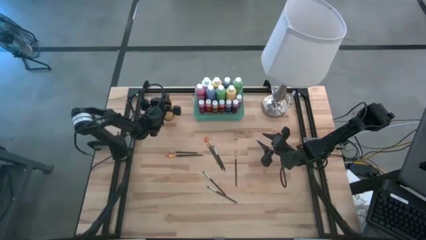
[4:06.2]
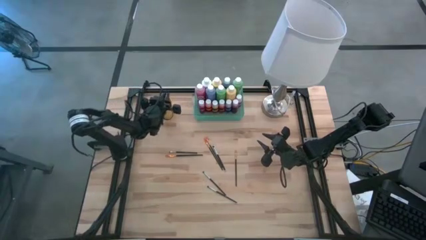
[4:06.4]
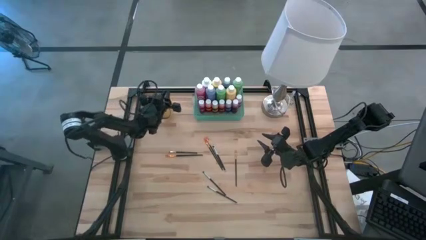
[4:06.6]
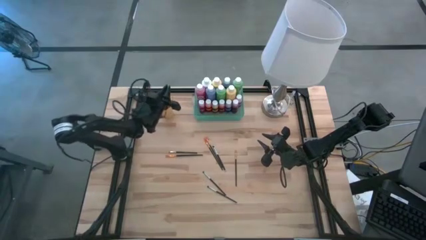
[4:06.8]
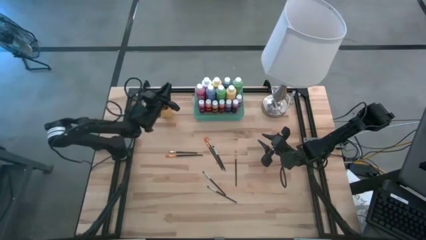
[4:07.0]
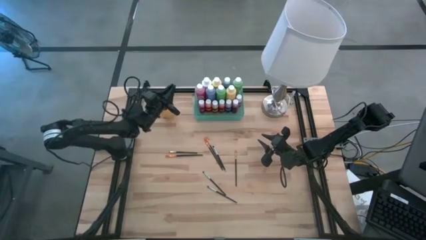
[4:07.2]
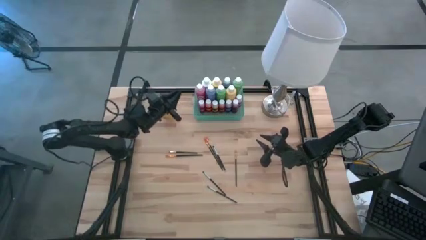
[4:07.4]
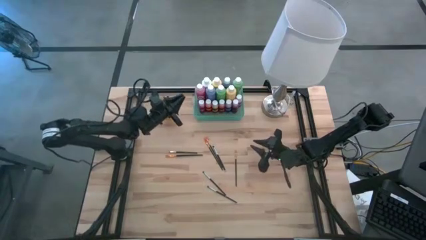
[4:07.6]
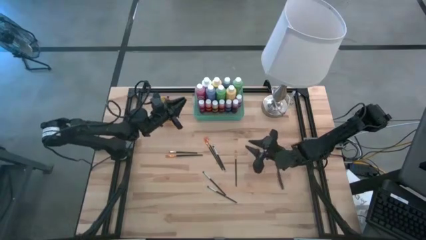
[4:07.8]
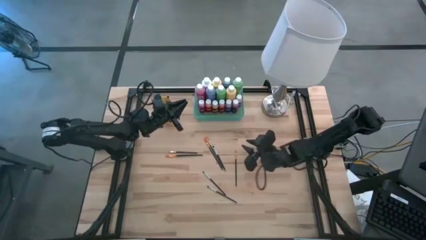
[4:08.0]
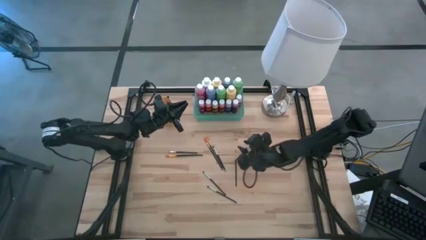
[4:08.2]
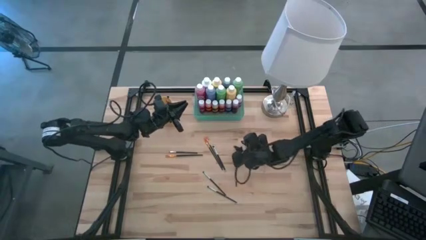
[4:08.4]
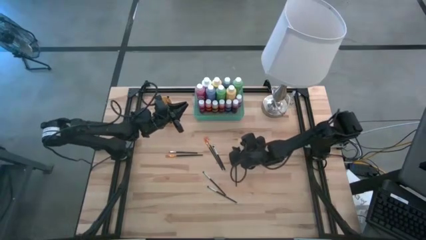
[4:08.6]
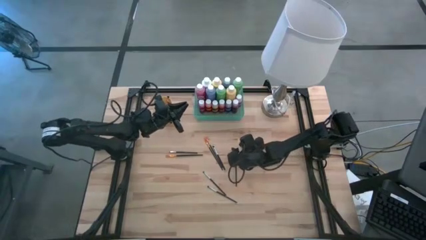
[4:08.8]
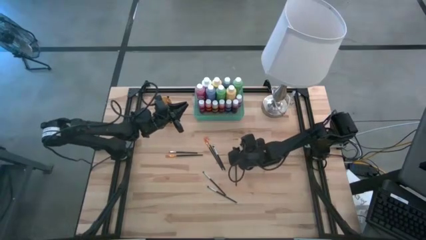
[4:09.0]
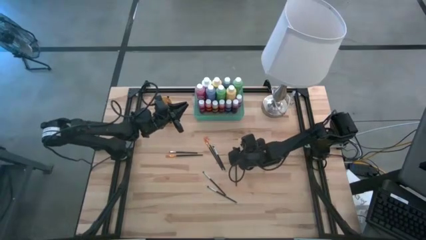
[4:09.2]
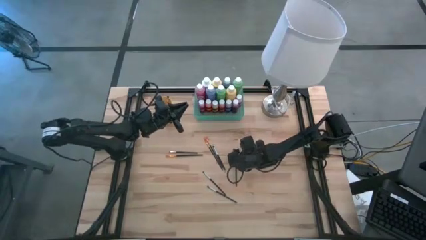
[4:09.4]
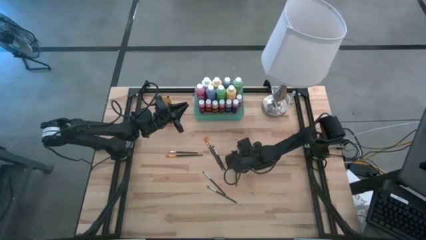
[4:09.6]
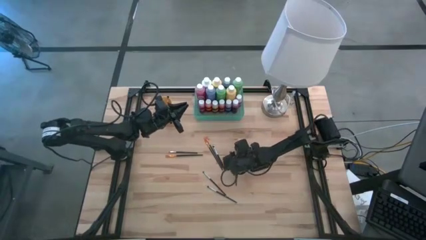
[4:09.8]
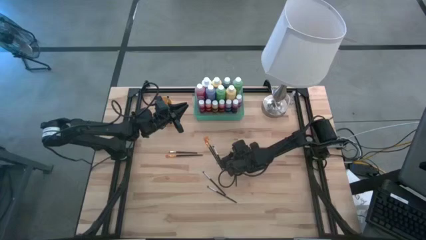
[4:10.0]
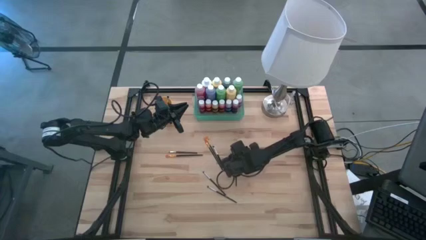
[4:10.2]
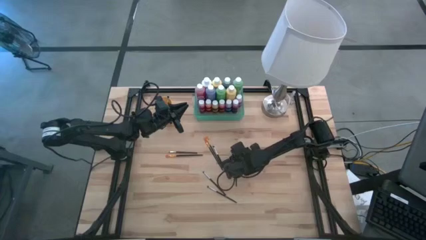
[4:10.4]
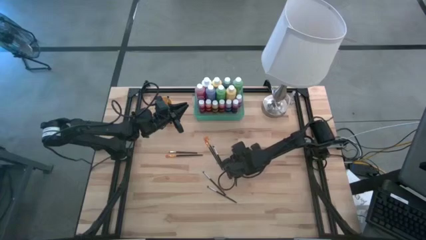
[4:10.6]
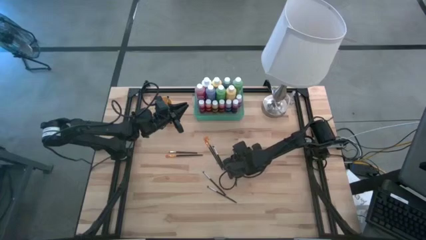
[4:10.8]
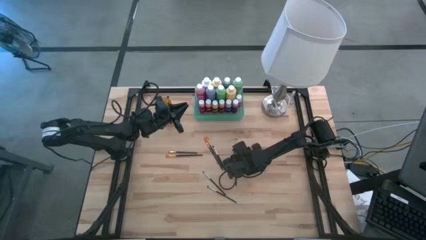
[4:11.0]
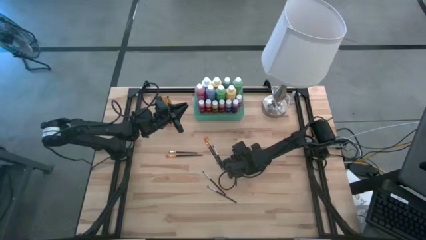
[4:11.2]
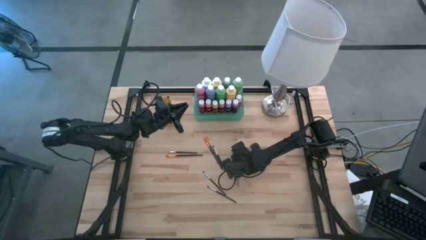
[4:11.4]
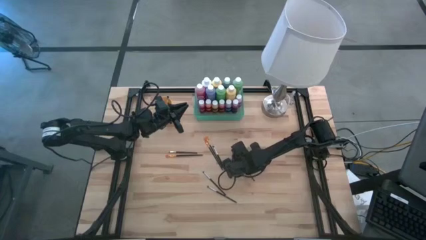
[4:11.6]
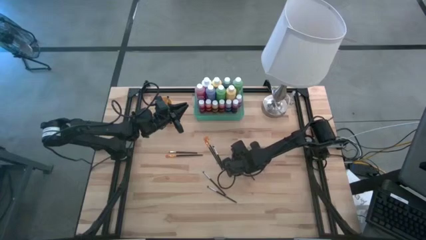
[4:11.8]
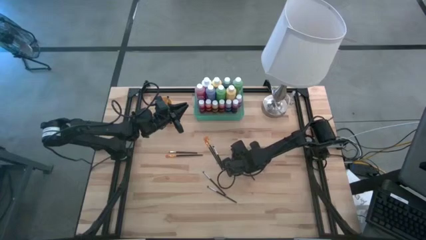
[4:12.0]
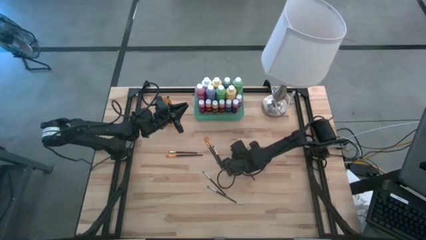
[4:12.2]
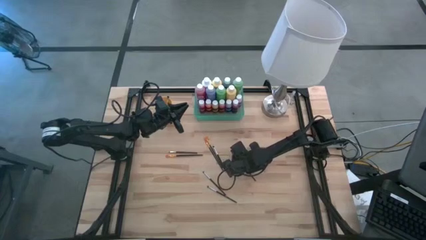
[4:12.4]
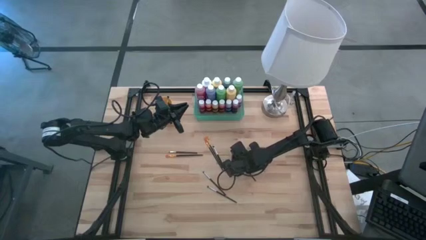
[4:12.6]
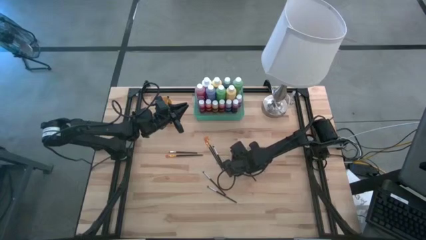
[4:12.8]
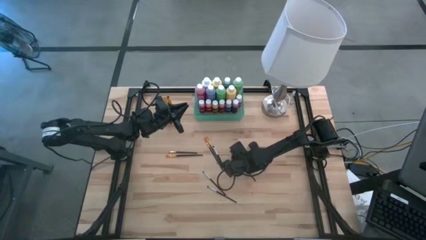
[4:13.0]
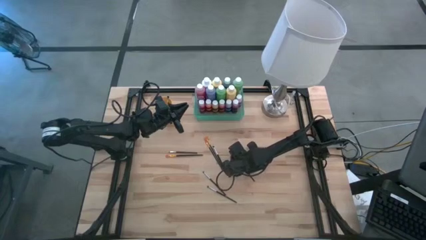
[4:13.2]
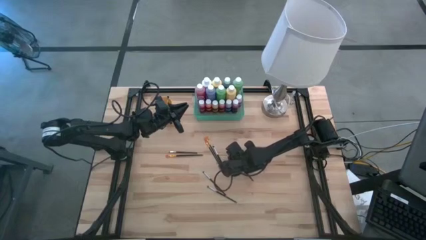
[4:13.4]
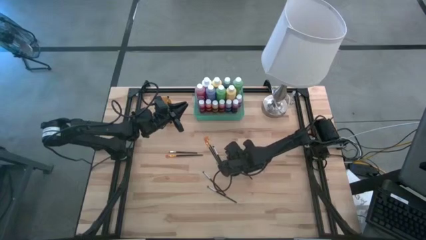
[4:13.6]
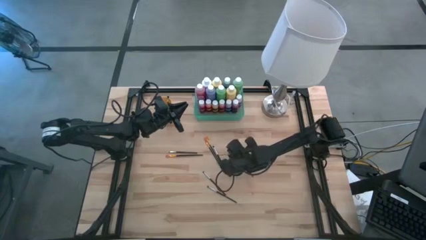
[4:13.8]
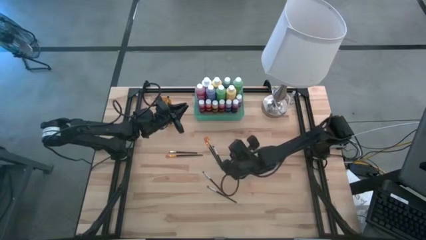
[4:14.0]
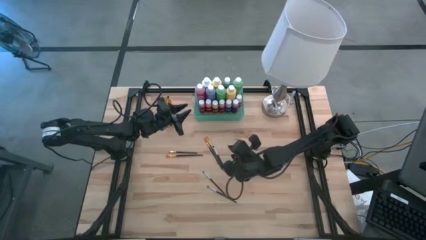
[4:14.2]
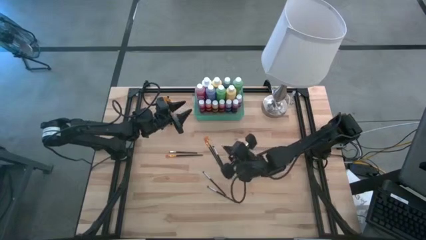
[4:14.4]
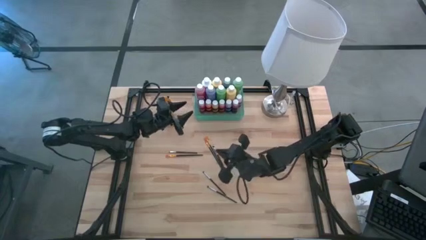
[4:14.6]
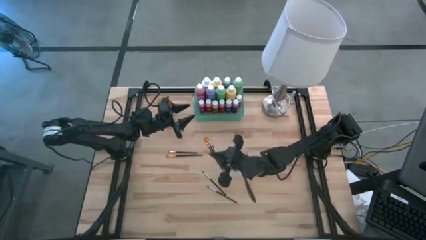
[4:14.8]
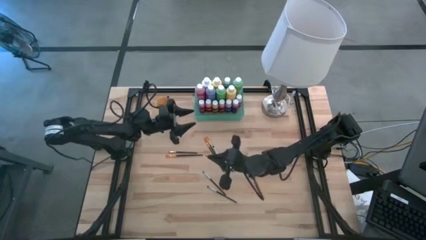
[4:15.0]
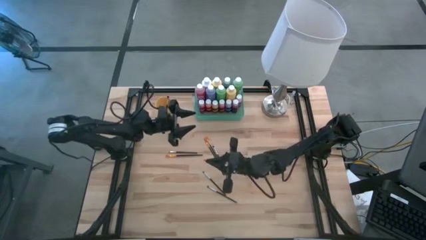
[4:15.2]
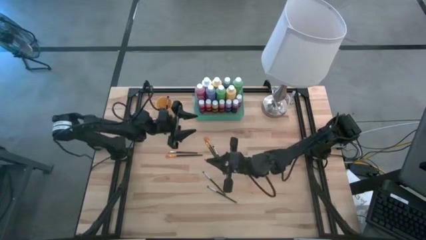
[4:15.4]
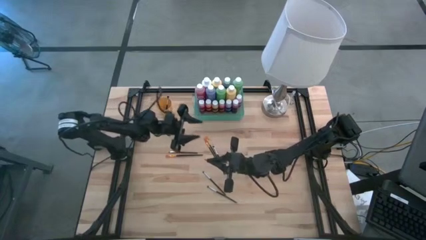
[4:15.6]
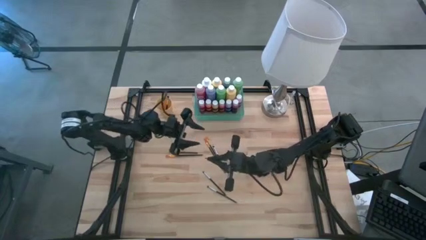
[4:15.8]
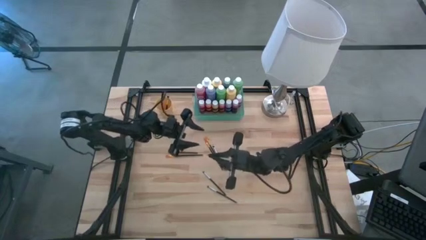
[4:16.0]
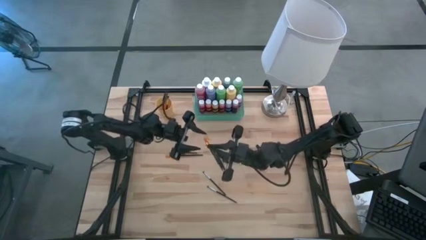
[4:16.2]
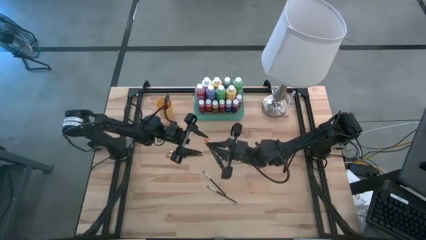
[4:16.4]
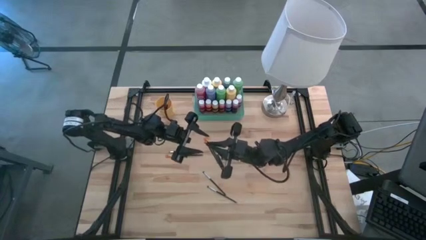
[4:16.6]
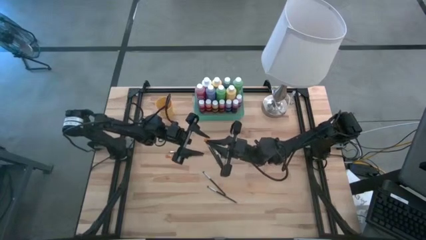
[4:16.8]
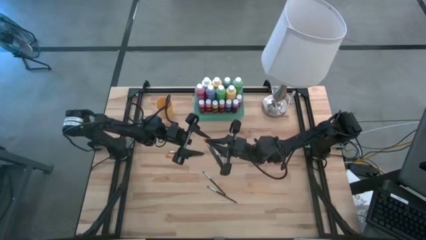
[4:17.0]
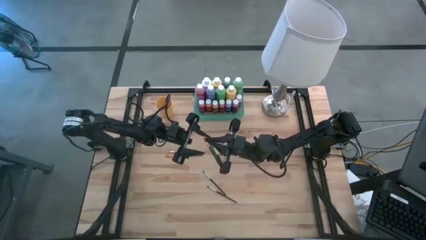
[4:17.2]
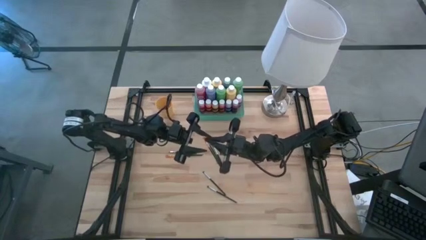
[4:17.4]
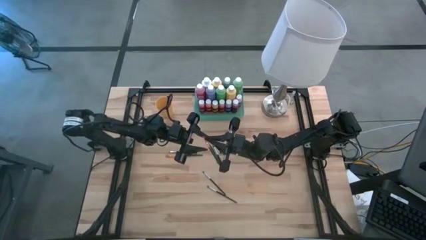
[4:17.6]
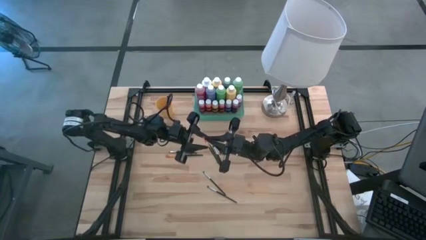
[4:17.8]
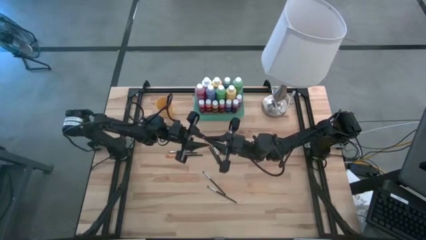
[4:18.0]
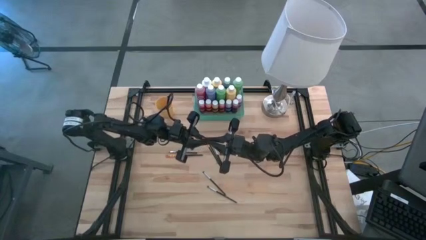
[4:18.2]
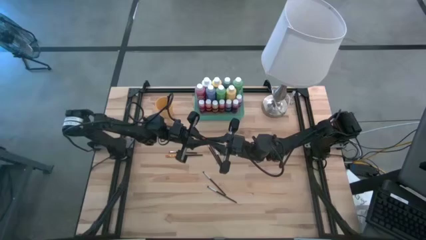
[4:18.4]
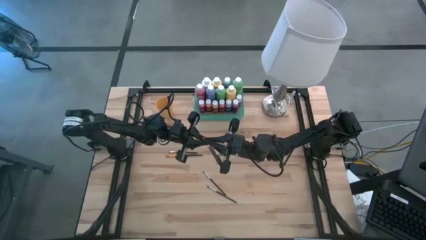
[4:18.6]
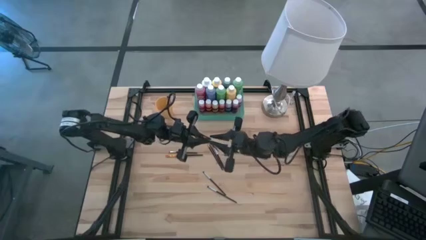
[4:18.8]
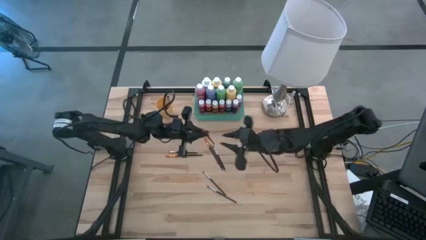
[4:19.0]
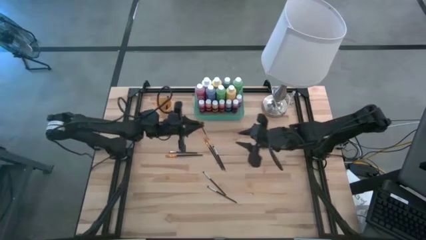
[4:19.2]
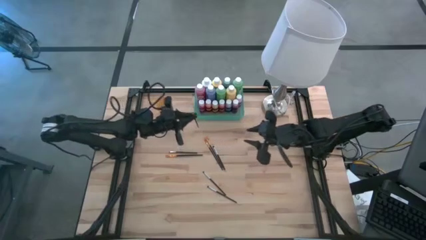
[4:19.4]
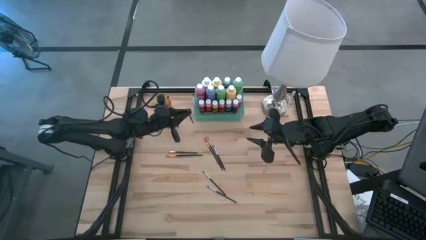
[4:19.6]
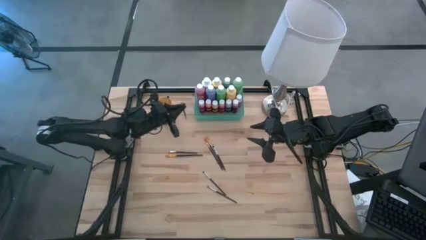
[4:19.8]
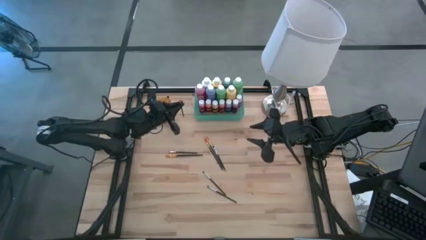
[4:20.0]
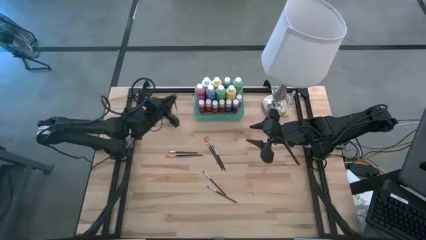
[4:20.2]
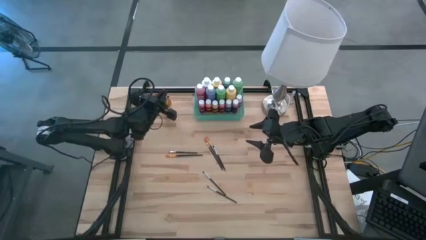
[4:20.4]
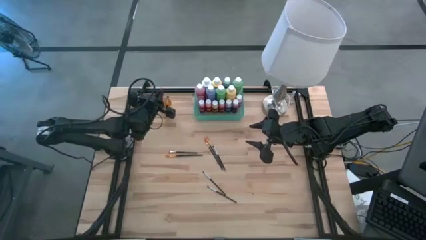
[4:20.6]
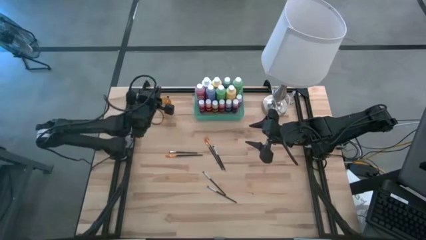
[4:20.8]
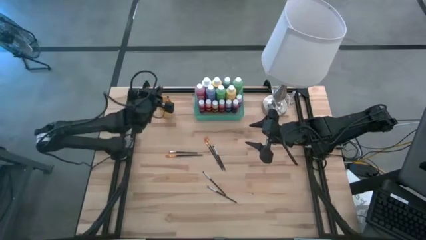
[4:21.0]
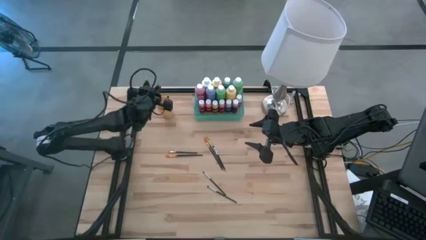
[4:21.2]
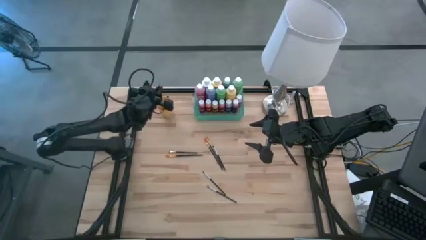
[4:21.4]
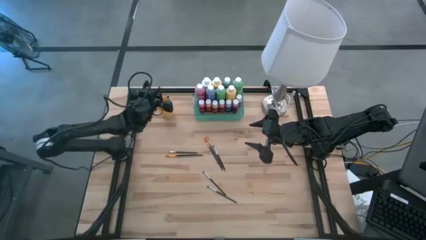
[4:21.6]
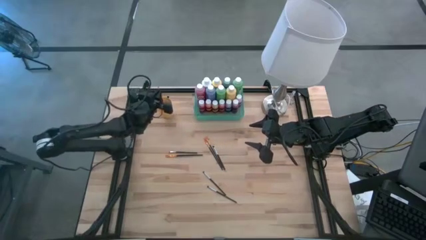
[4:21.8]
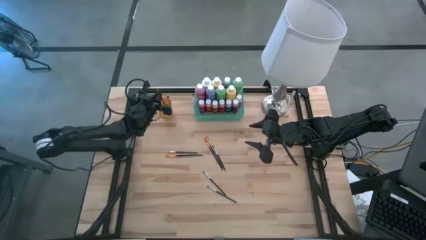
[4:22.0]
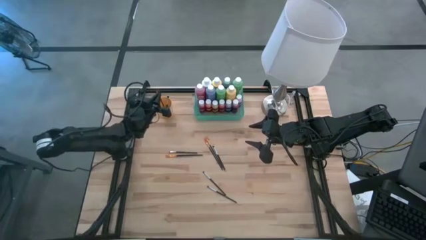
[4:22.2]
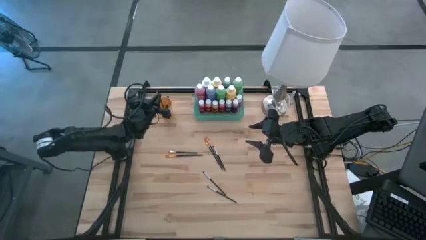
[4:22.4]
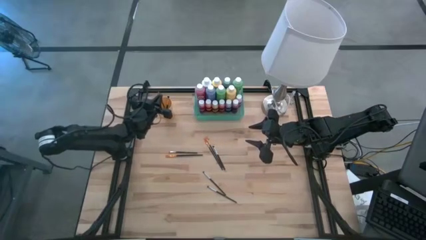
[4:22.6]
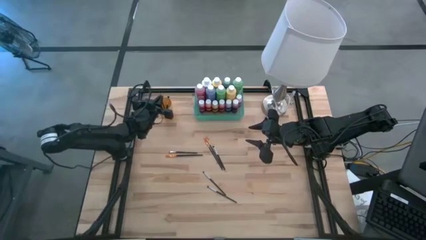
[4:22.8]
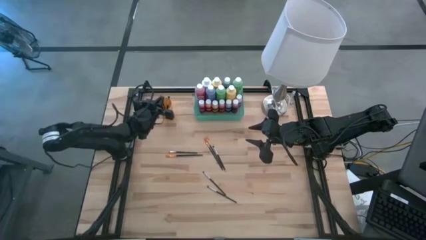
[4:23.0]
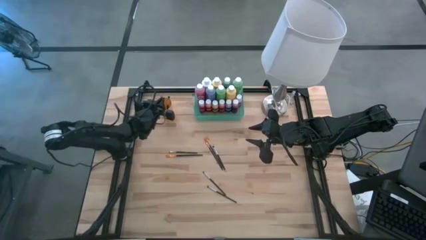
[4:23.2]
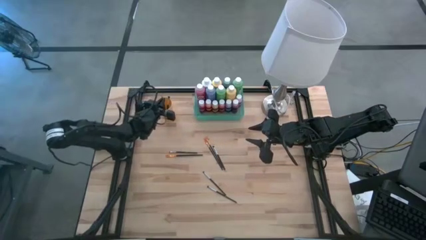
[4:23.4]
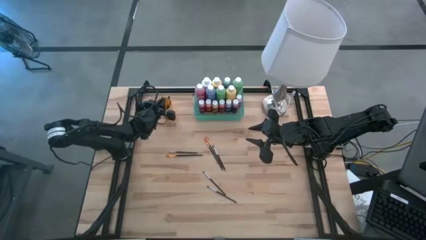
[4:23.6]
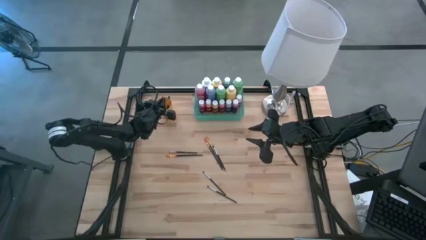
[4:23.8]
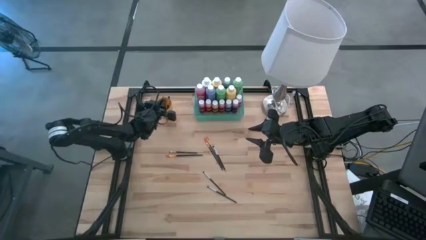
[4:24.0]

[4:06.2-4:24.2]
Task: Pick & Place Paint Supplies
Put the gold paintbrush into the orange cup
